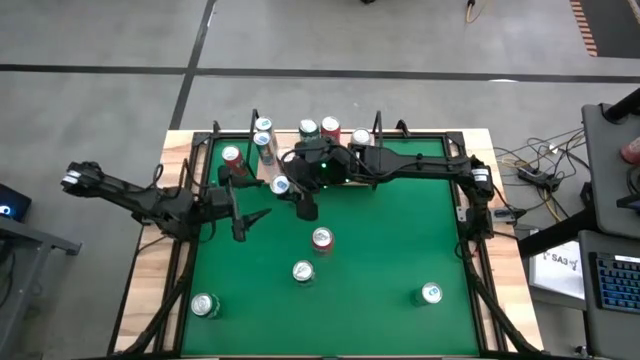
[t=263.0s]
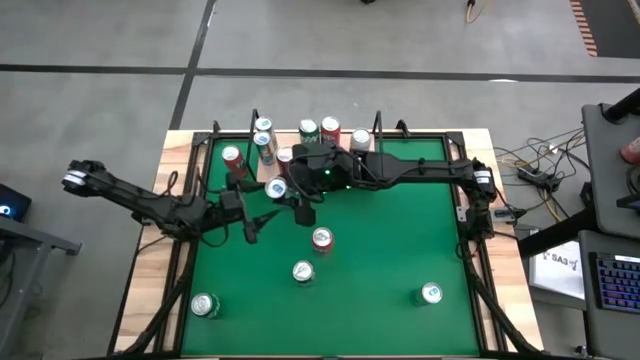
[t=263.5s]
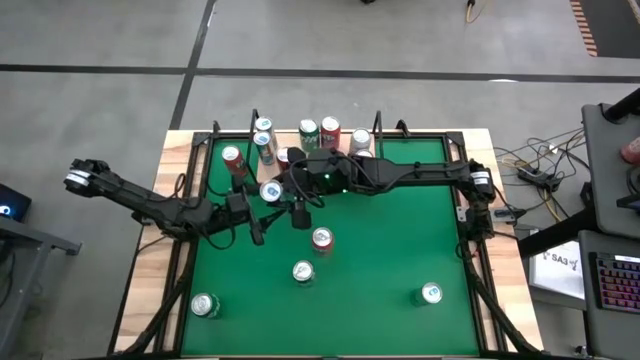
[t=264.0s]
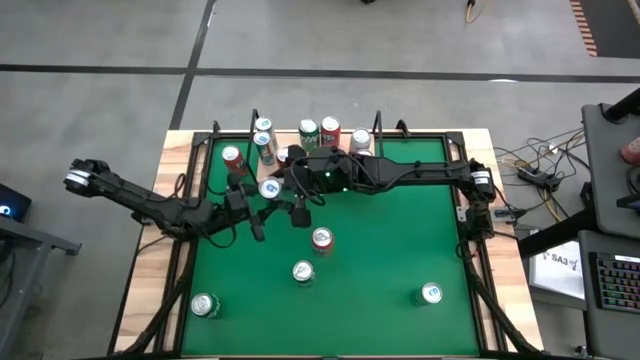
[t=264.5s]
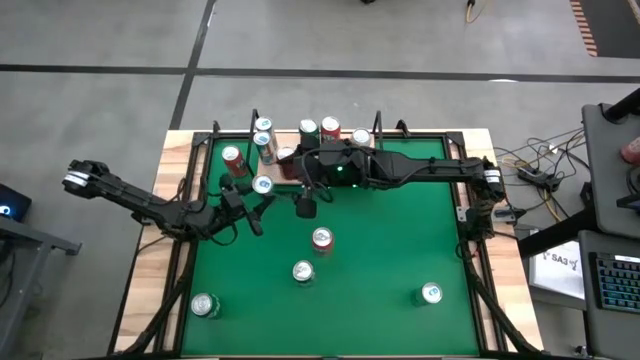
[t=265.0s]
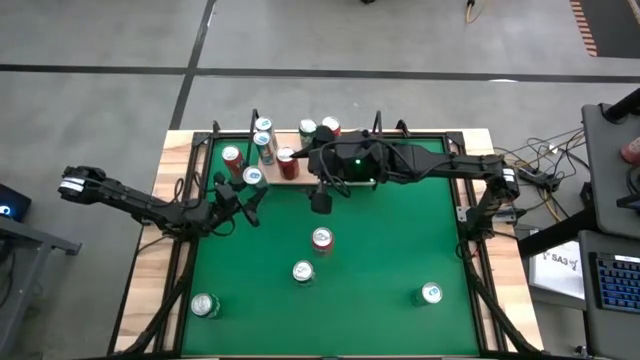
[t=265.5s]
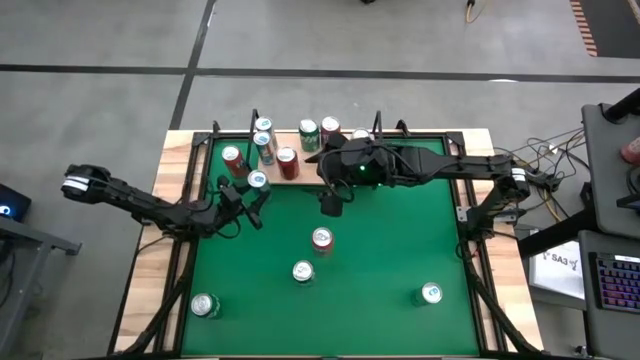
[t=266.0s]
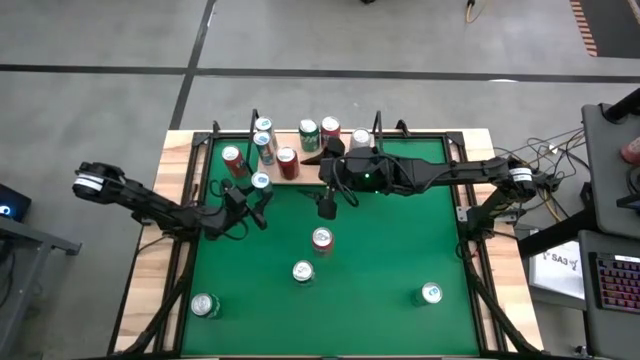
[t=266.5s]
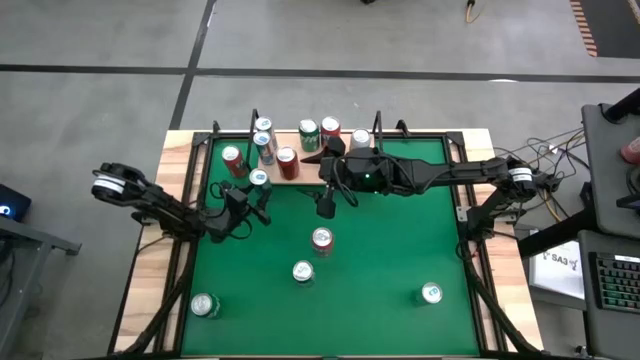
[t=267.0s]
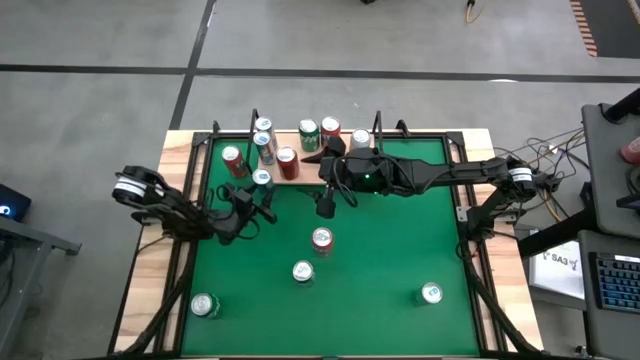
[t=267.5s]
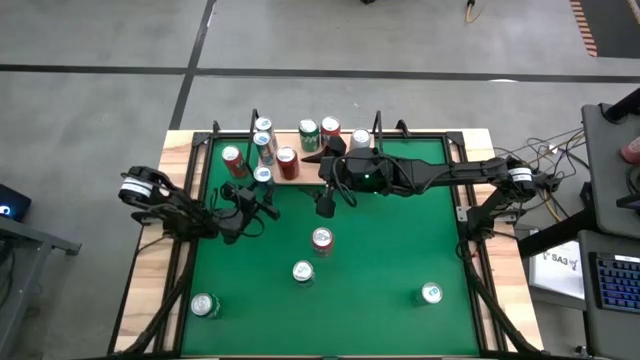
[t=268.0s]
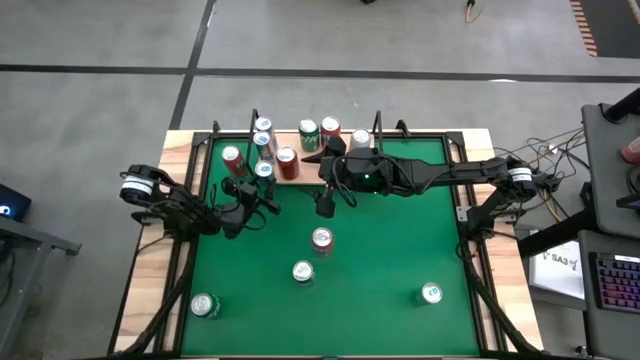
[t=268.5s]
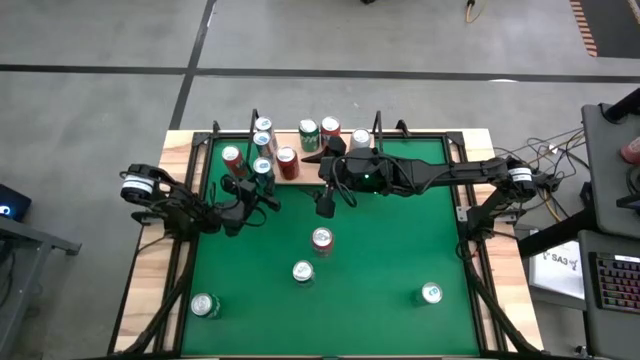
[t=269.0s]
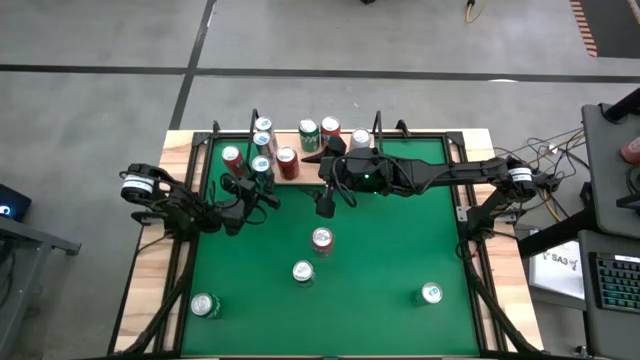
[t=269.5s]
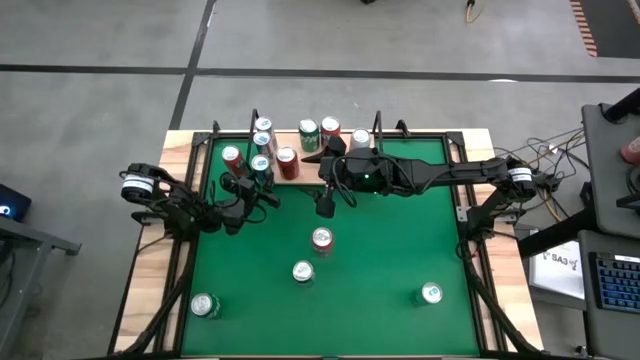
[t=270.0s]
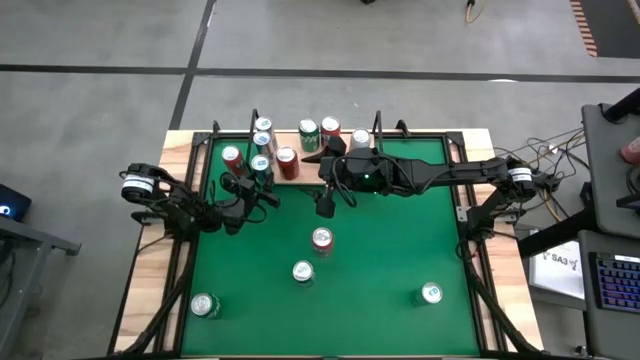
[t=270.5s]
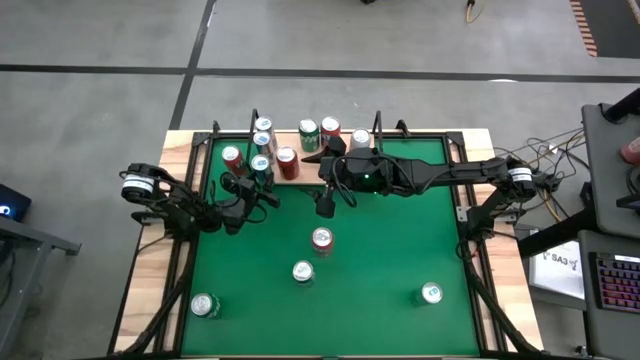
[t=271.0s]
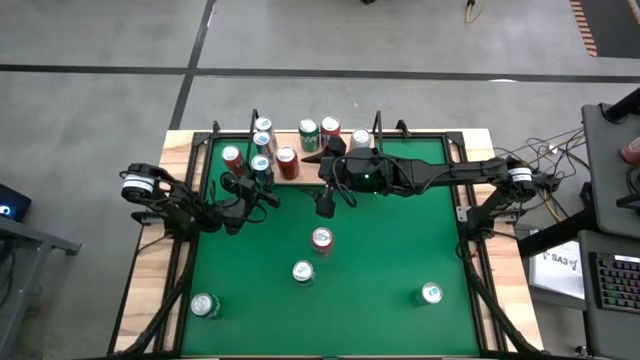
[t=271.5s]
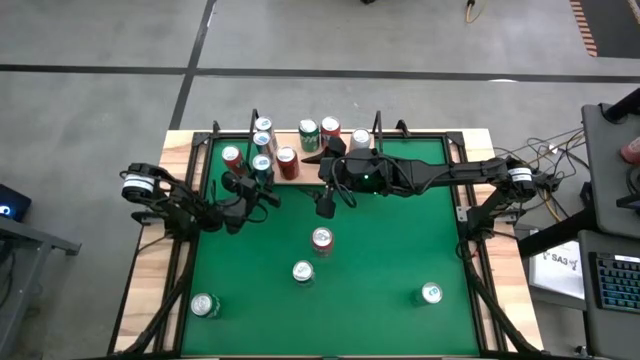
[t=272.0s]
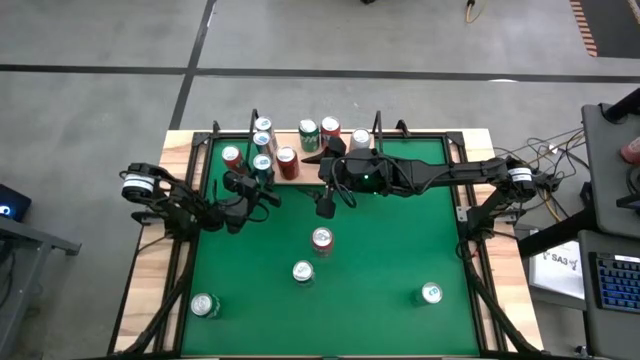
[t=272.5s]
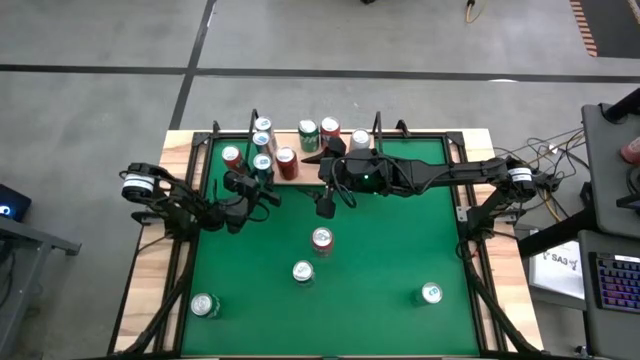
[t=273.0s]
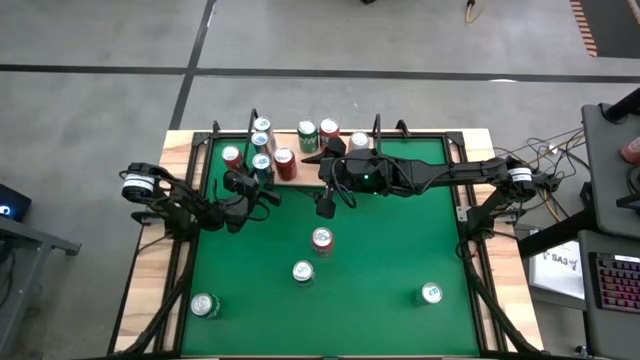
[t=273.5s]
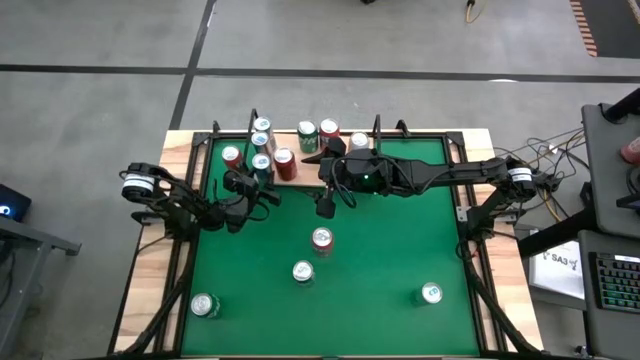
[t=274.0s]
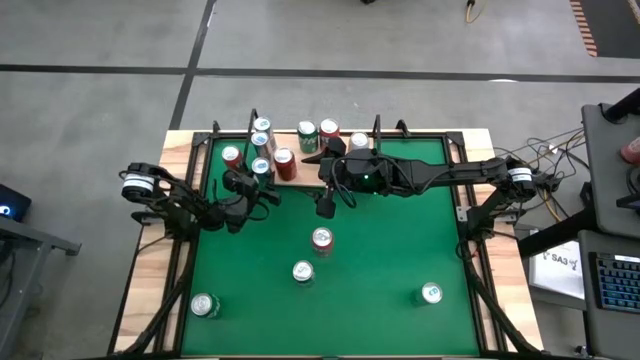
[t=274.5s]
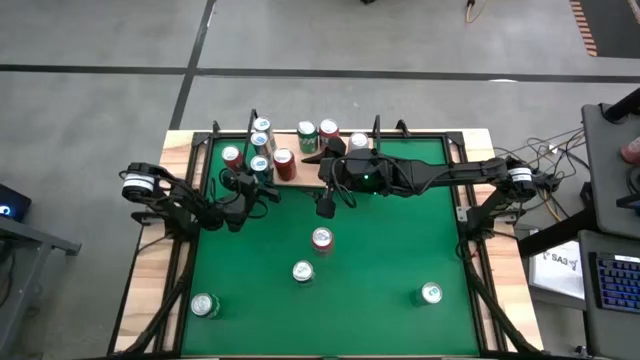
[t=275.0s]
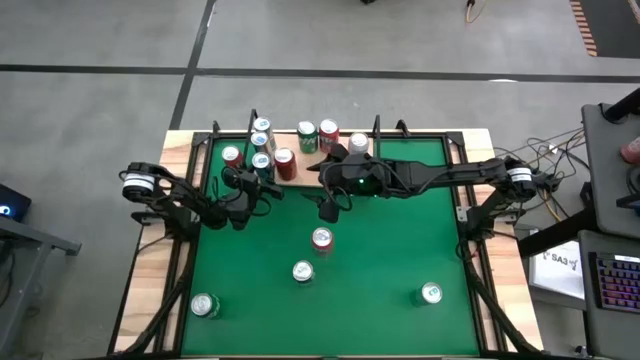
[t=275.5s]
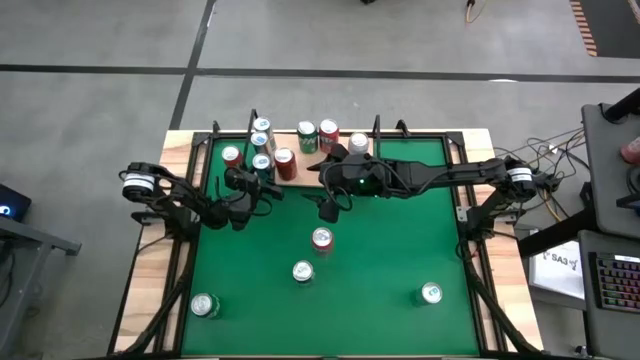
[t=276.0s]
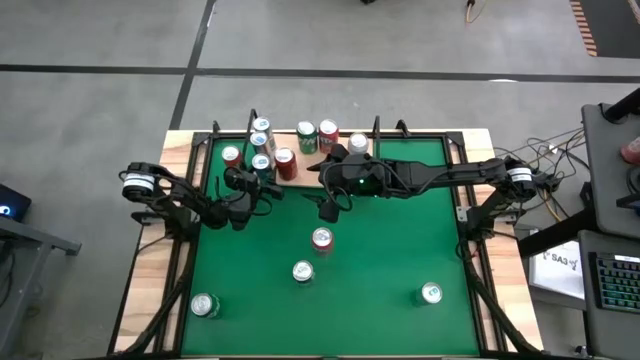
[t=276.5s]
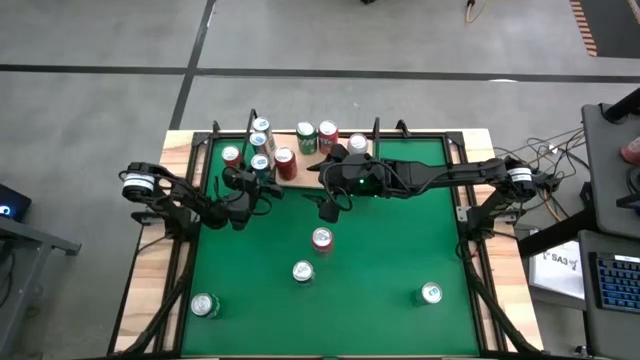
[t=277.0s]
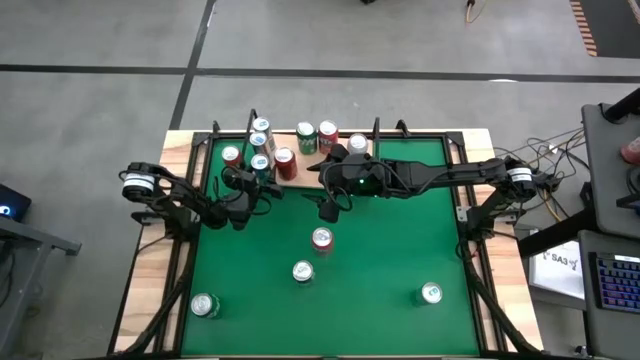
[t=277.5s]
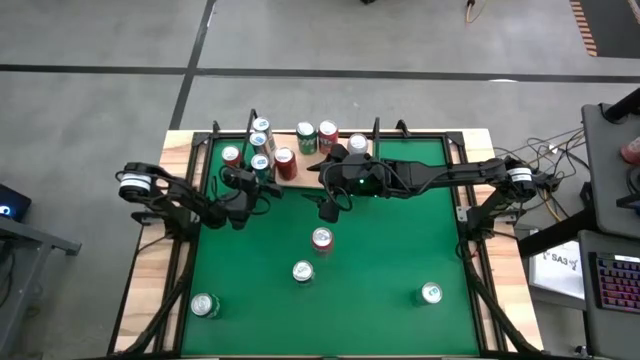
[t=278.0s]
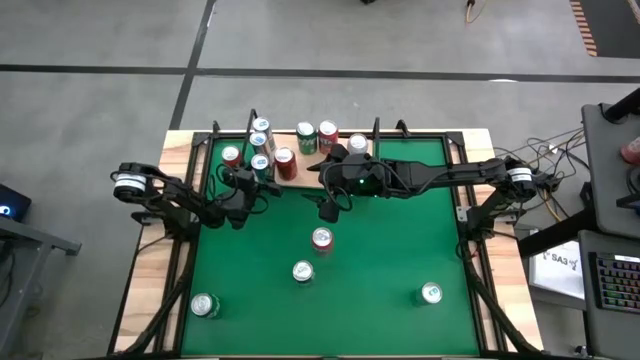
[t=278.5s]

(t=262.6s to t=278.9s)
Task: Pick and place cans onto a shelf
Put the top blue silver soda can on the shelf aligned with the other blue silver soda can

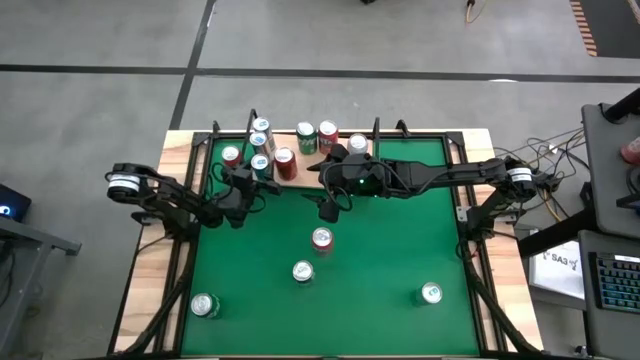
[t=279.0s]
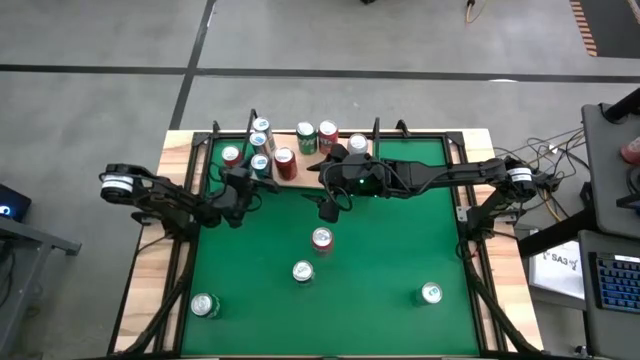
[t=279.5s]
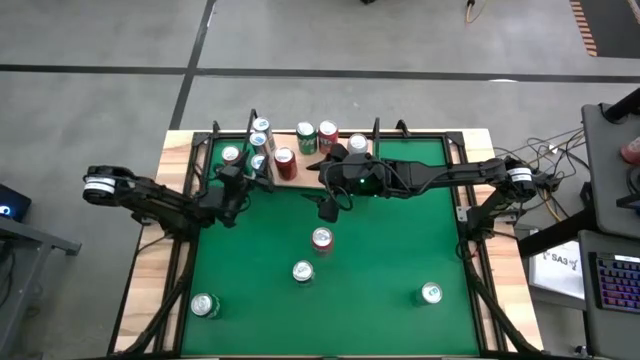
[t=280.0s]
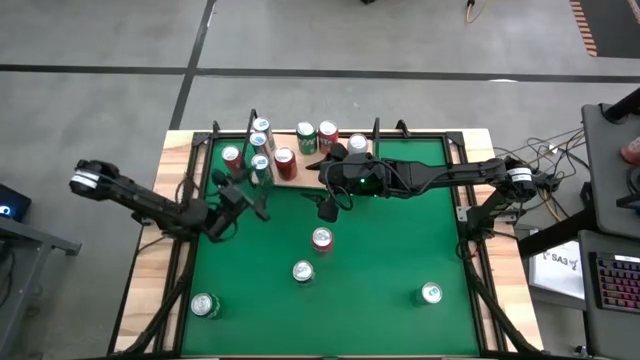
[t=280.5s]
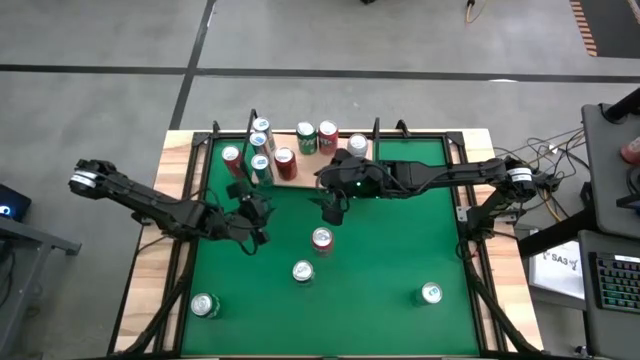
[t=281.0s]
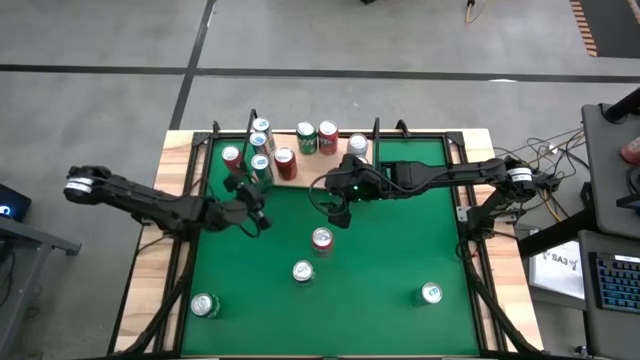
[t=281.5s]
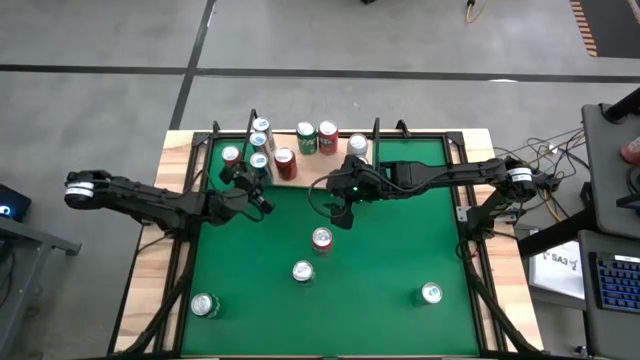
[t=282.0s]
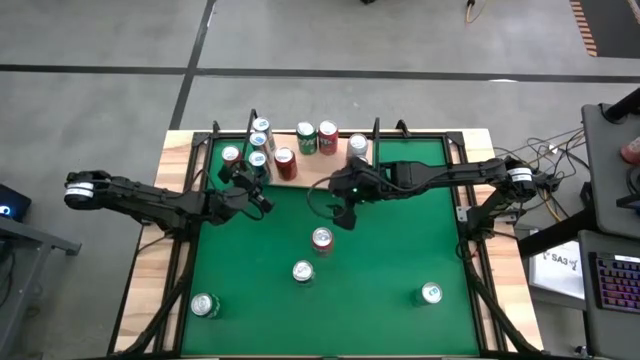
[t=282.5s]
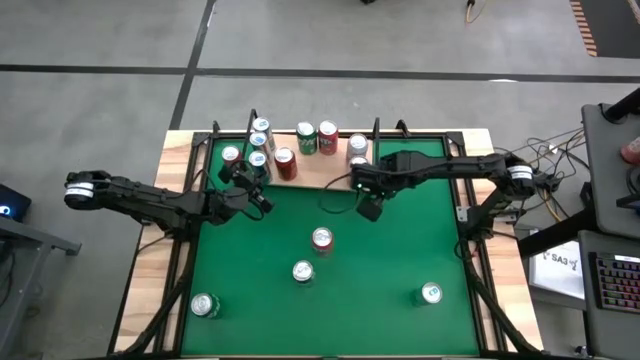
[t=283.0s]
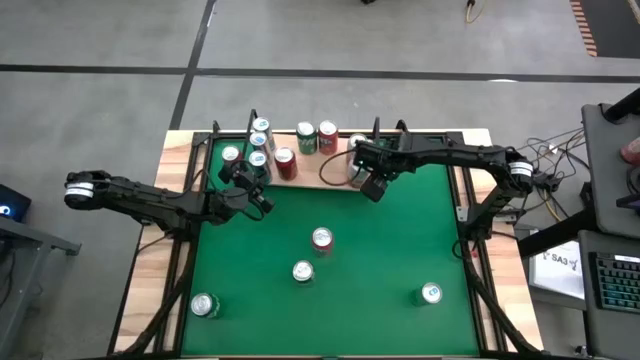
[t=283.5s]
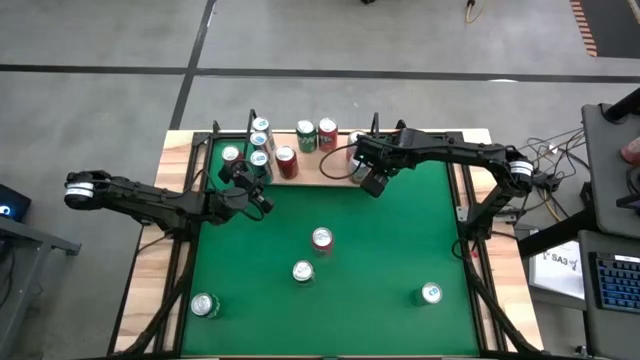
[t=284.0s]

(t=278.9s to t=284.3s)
Adjust the shelf
